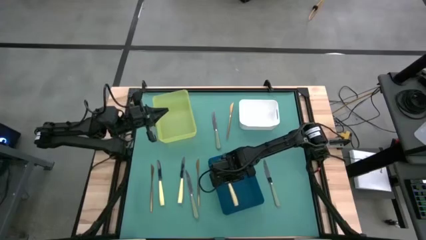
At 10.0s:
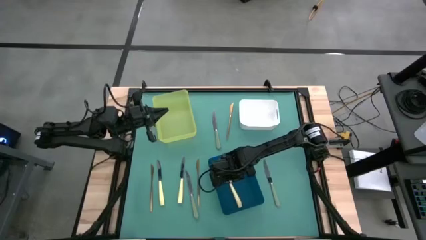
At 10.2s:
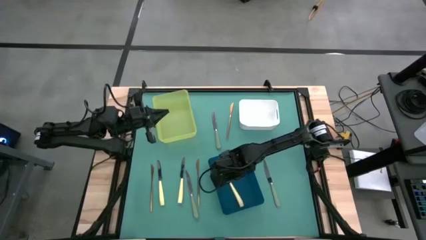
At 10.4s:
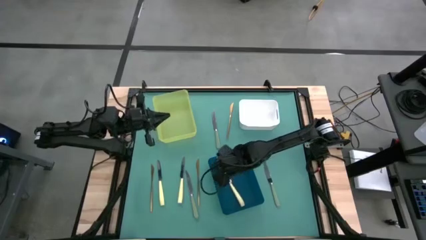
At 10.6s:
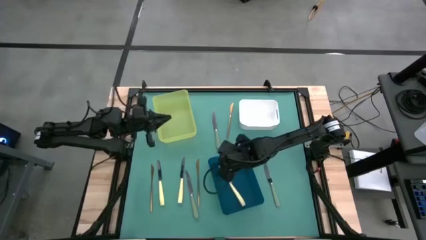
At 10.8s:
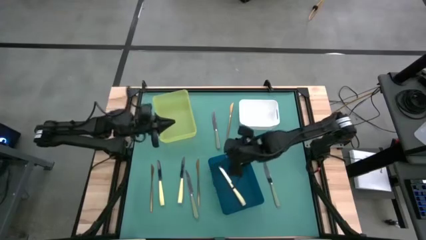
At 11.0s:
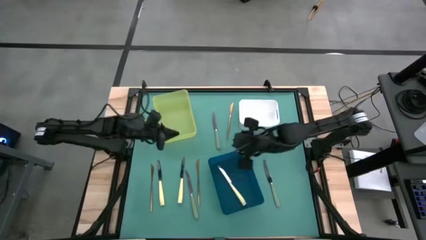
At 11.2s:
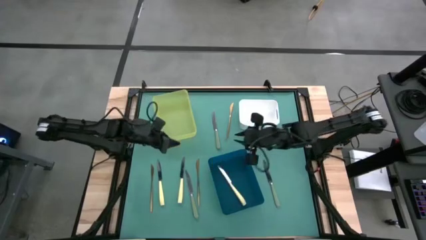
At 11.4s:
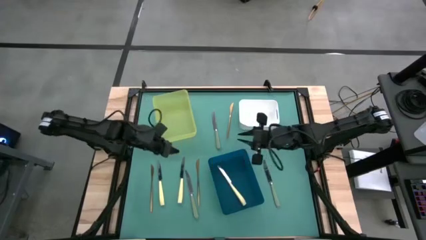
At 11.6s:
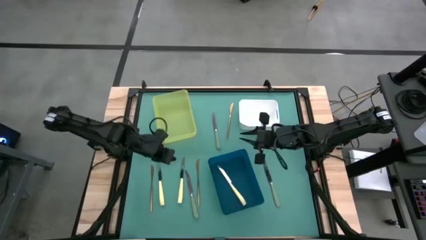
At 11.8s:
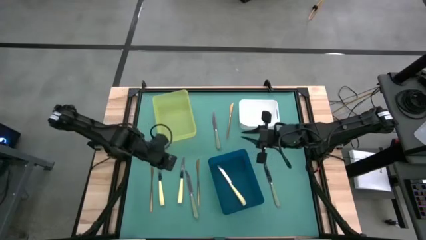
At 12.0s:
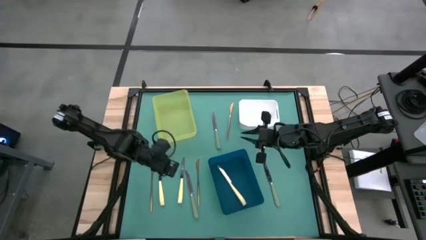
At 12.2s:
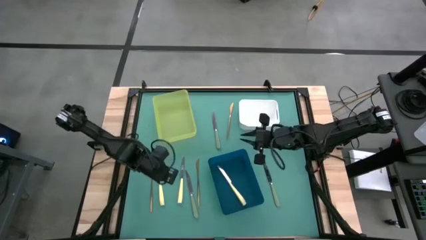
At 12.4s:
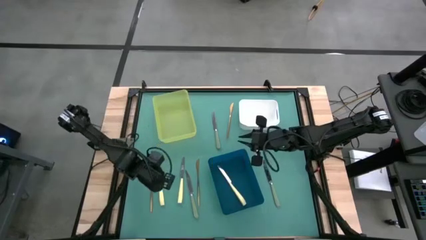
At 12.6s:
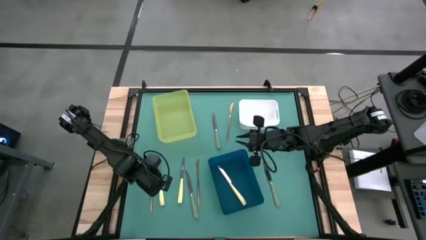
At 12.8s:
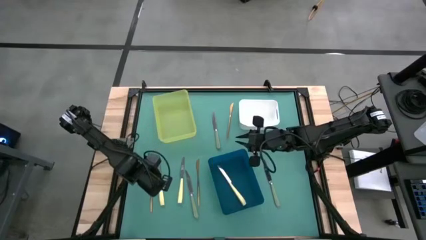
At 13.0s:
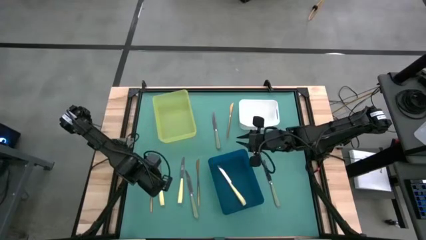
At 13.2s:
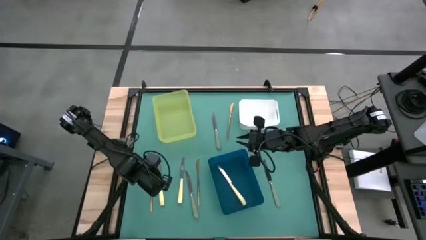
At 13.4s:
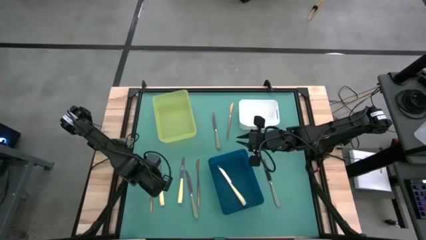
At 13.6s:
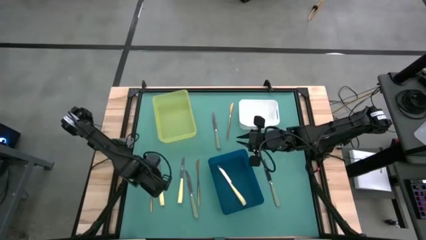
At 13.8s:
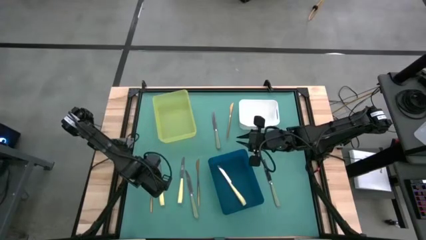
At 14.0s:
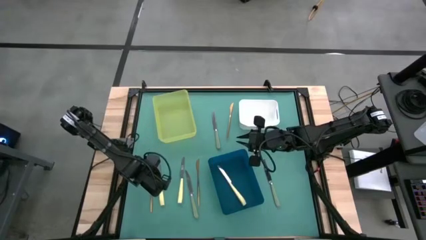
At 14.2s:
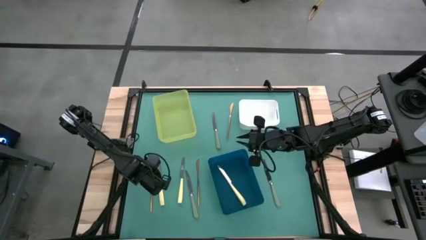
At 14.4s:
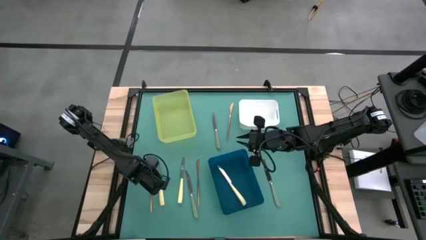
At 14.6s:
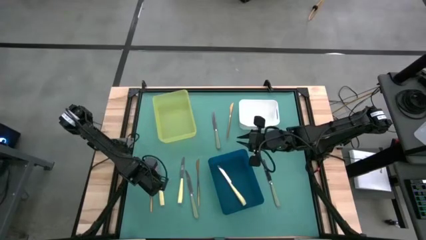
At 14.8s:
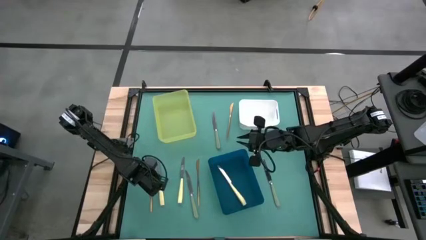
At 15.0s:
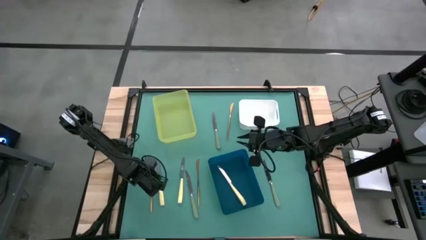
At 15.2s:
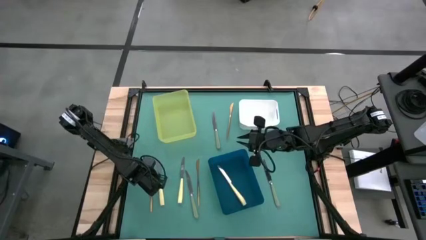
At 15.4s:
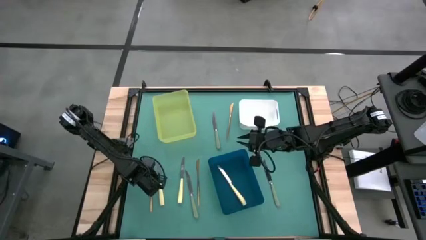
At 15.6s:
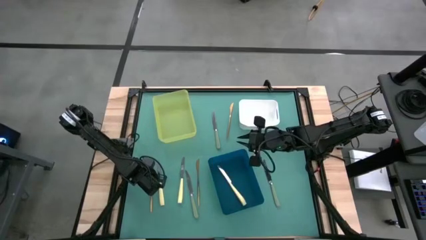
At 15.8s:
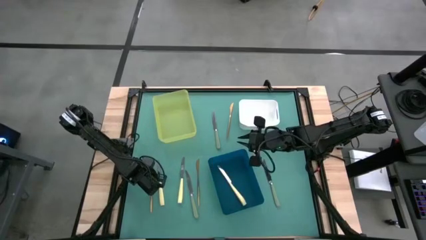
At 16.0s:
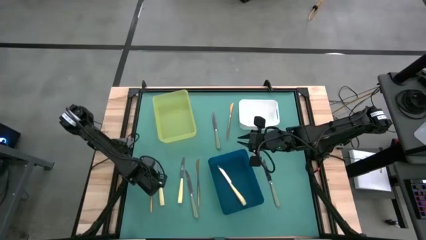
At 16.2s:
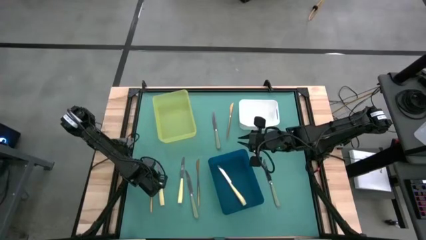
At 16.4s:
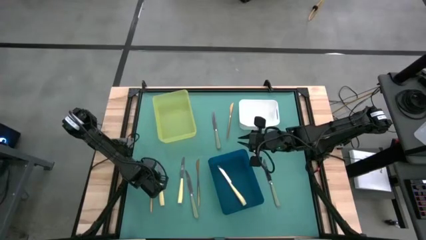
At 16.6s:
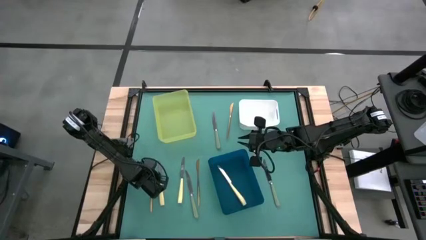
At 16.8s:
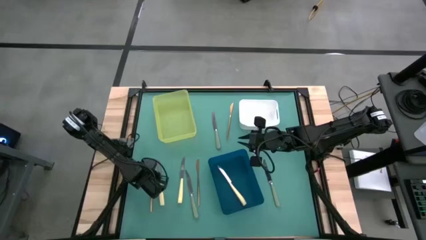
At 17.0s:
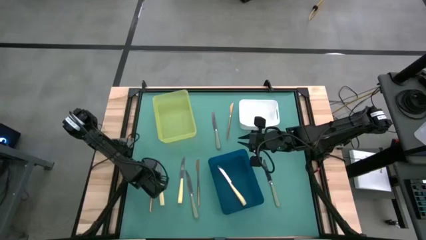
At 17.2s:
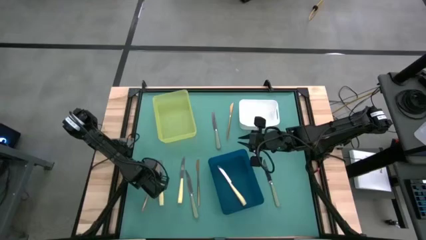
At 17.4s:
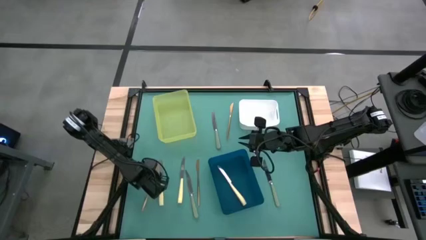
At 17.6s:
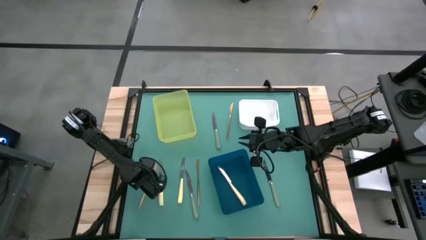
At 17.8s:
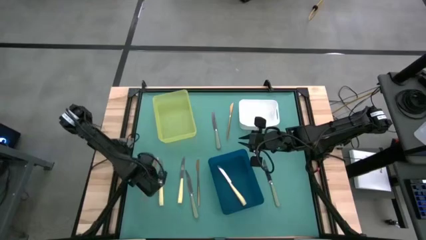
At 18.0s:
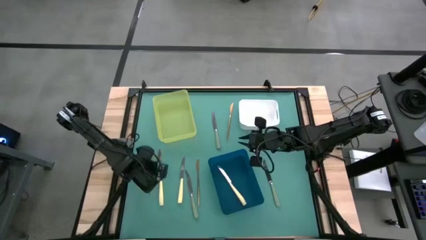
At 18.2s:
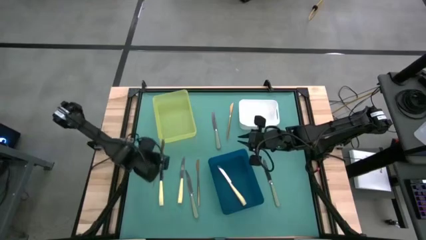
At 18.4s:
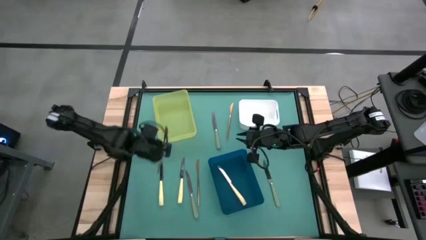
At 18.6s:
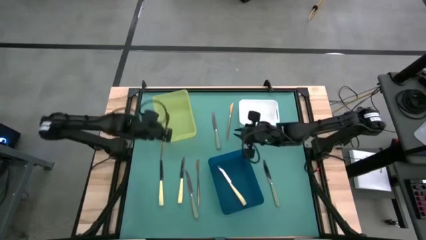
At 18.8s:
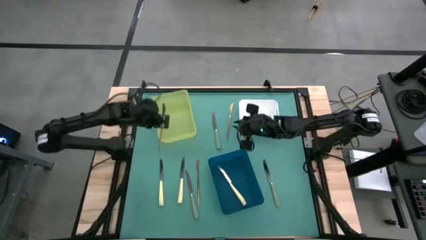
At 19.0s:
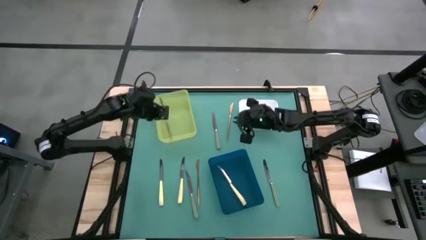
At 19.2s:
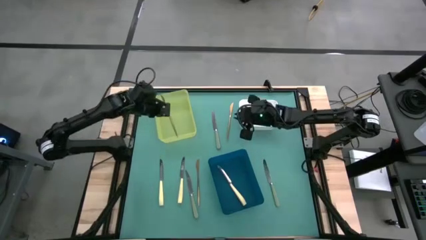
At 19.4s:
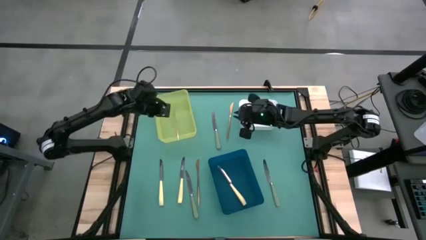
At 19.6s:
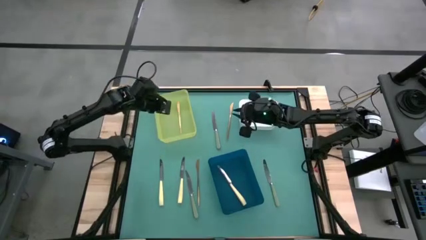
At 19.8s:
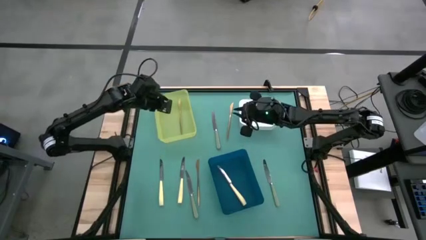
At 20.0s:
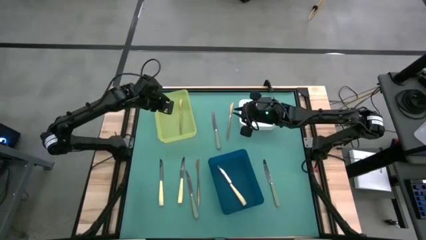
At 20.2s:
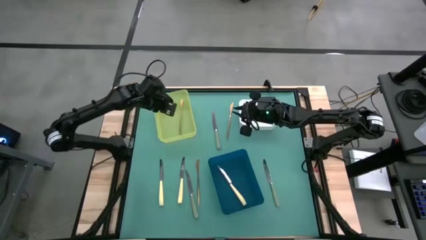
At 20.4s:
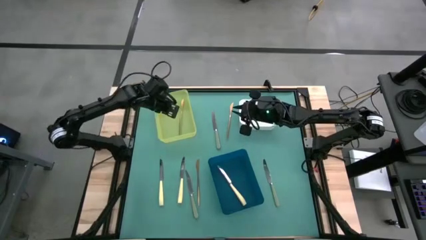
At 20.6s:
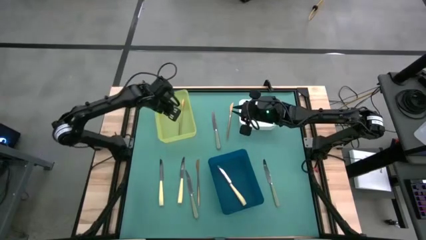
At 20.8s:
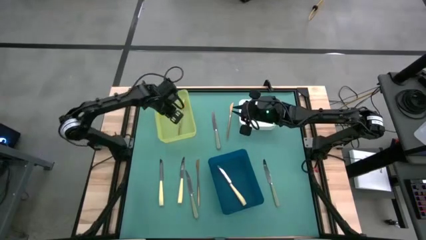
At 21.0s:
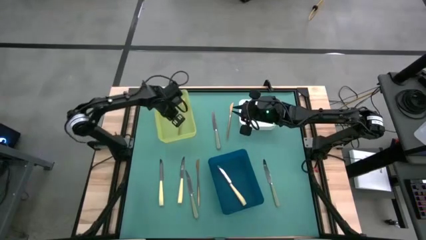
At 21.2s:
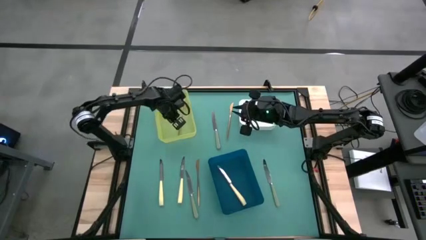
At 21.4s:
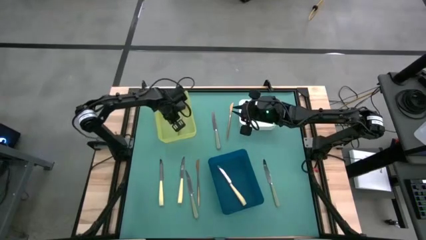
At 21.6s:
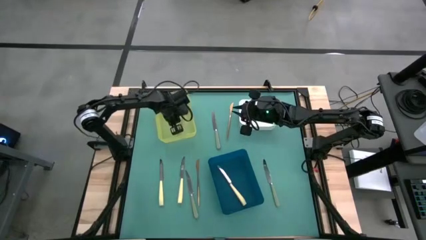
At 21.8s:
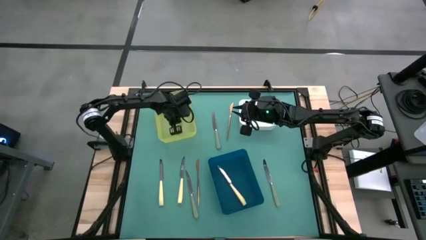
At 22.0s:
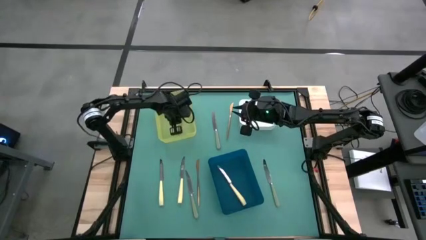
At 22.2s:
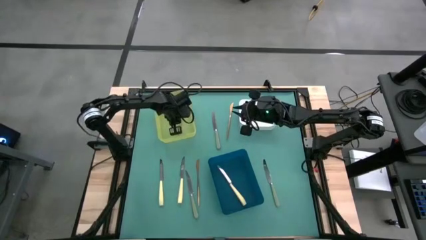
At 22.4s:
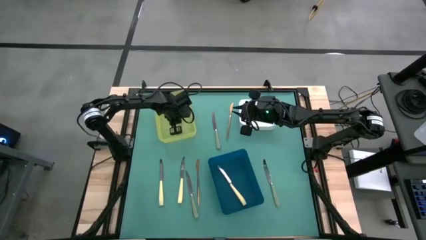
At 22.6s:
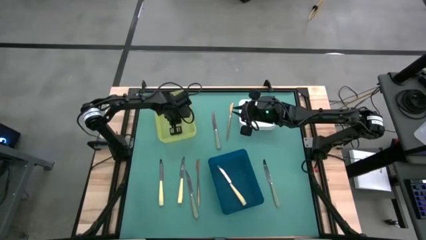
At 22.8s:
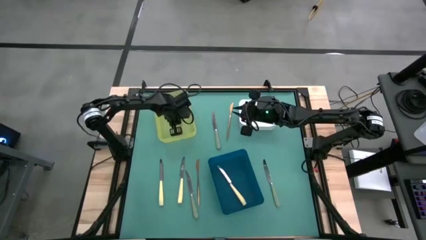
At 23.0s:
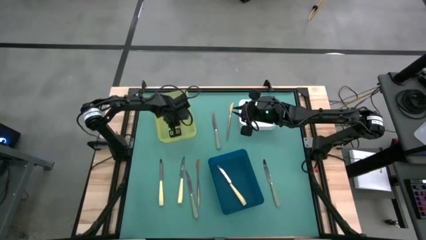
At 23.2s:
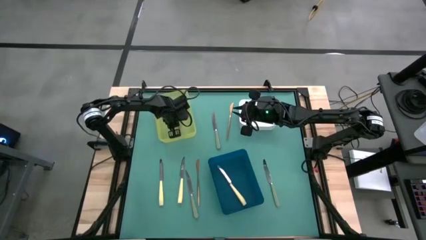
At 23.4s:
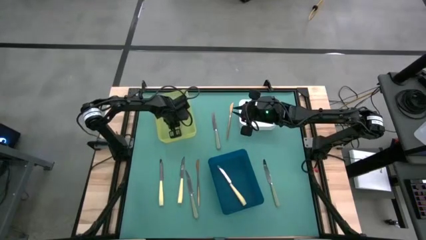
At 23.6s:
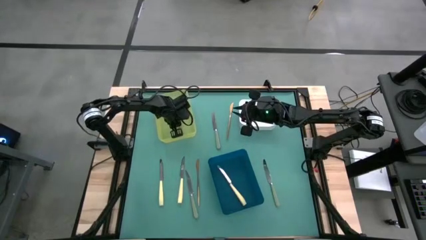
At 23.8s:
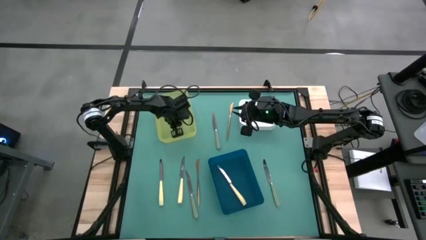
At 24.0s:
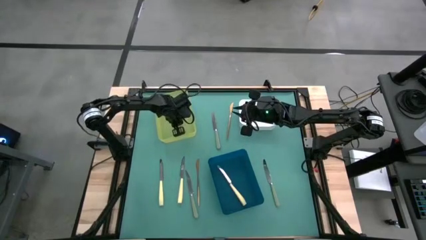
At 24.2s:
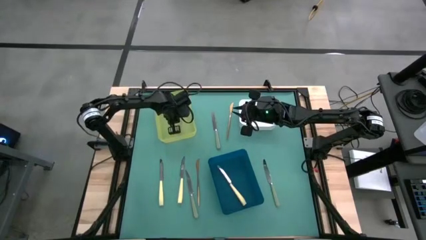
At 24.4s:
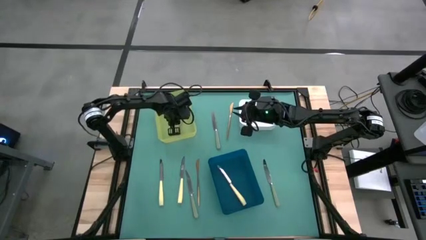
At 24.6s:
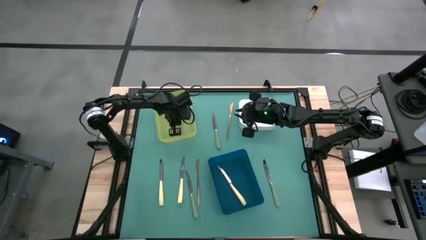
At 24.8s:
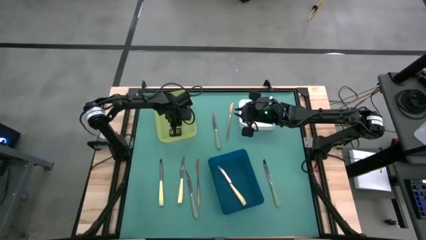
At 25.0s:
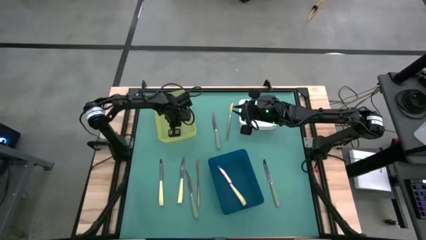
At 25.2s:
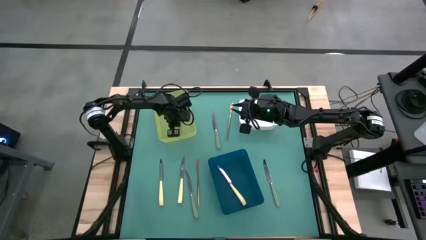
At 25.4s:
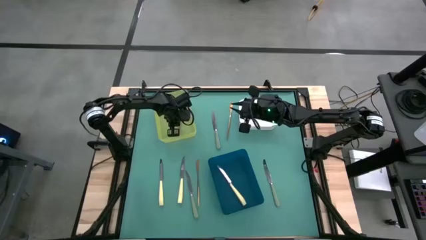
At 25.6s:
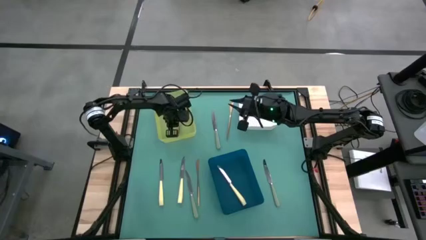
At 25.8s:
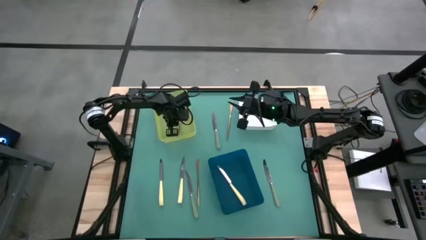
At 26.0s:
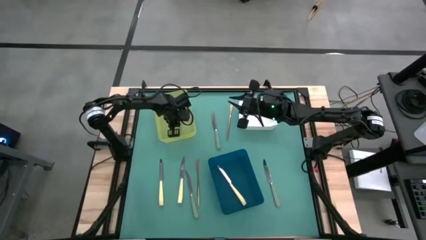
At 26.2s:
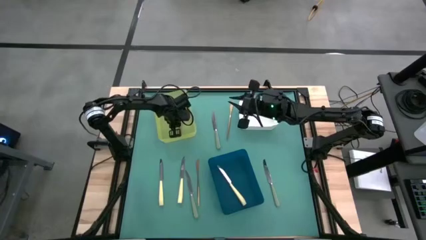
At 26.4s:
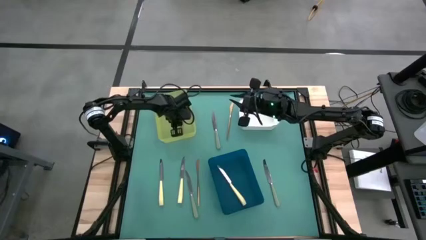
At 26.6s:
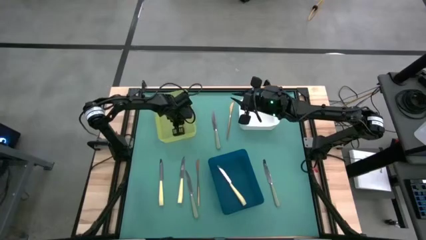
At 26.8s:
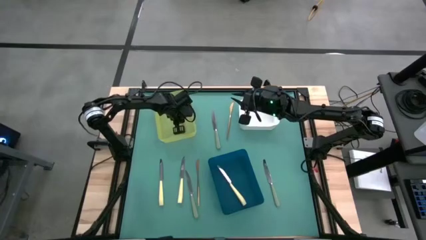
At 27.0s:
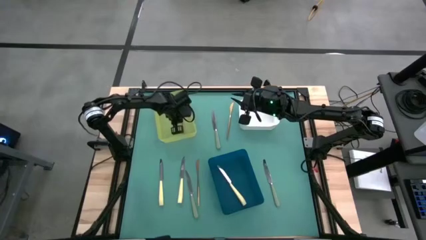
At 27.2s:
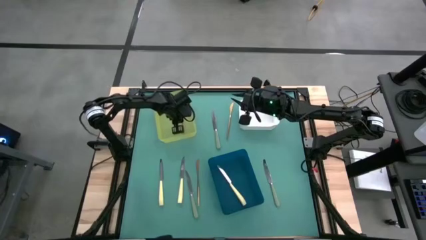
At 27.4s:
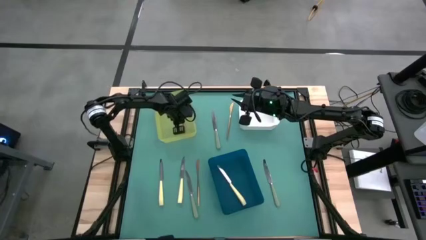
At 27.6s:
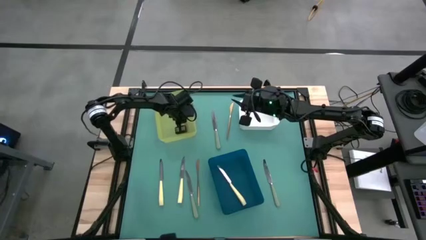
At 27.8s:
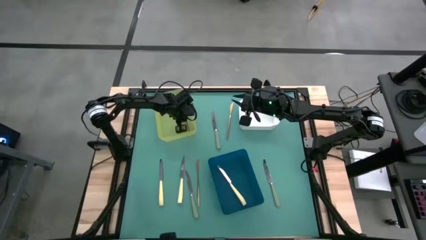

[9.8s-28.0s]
Task: Sort silverware by color (type)
Put the bottom left gold knife into the yellow bin
